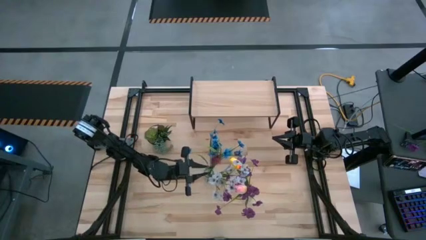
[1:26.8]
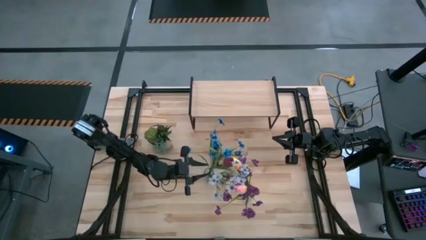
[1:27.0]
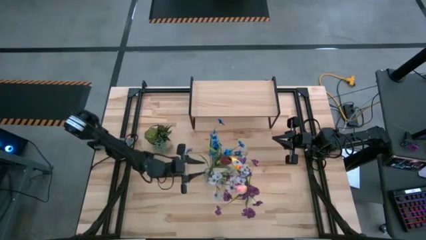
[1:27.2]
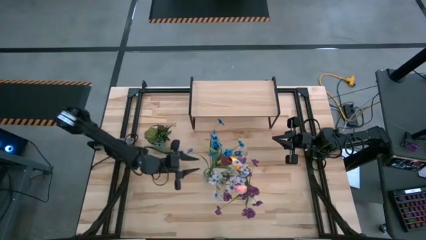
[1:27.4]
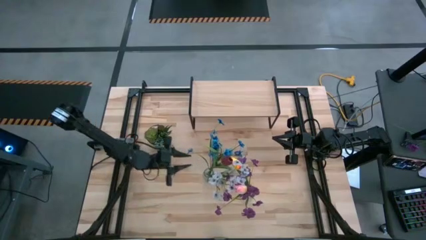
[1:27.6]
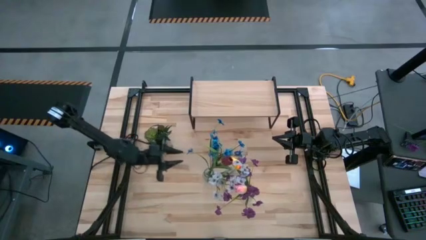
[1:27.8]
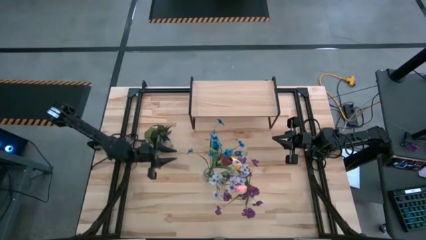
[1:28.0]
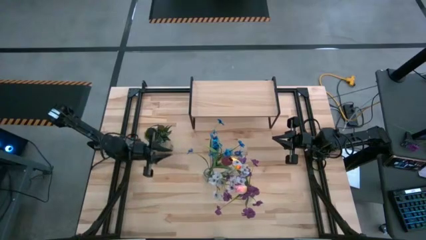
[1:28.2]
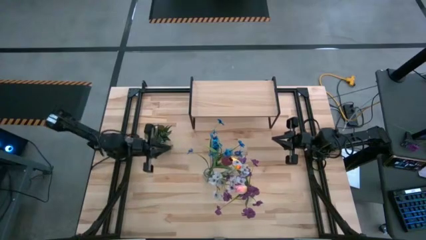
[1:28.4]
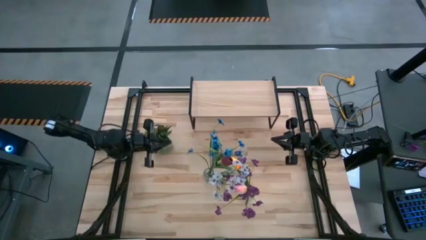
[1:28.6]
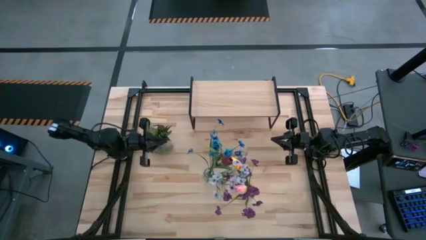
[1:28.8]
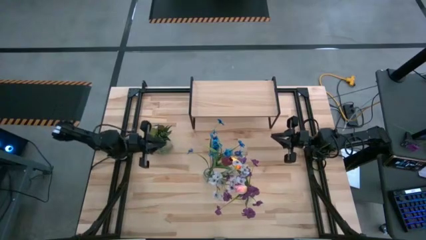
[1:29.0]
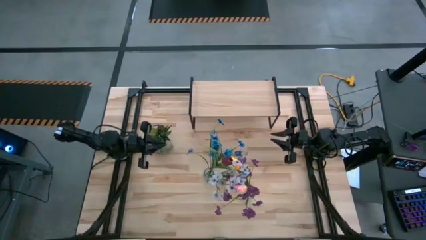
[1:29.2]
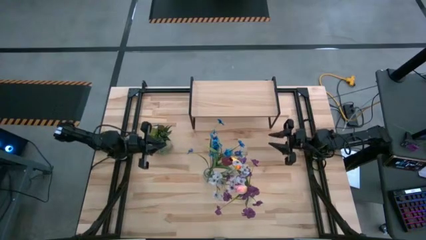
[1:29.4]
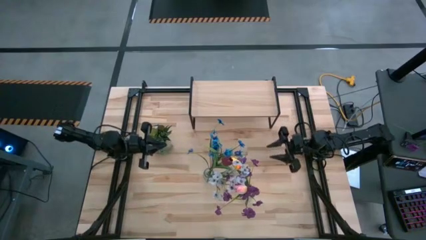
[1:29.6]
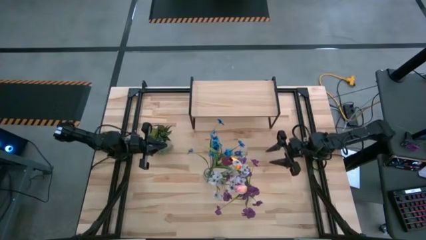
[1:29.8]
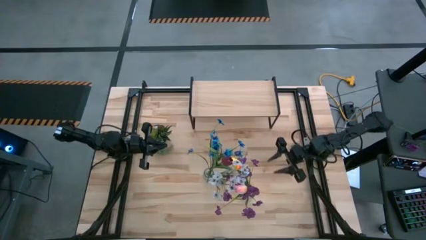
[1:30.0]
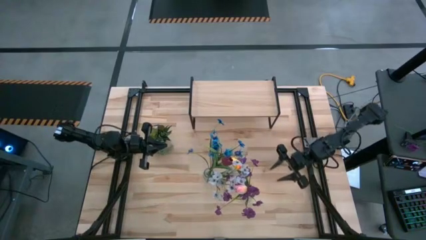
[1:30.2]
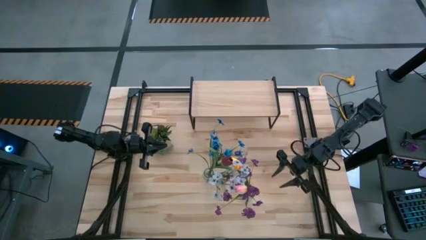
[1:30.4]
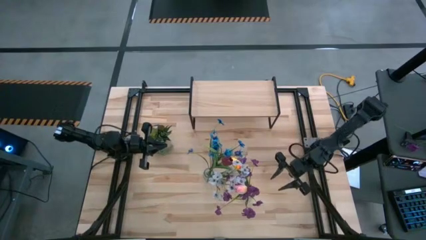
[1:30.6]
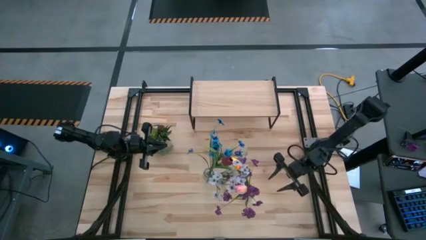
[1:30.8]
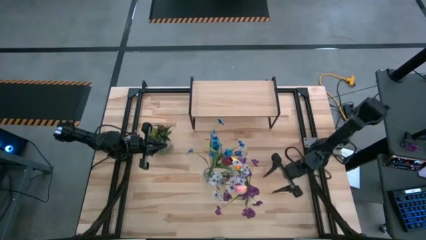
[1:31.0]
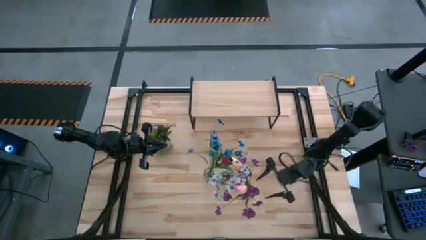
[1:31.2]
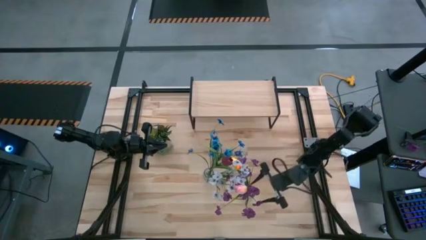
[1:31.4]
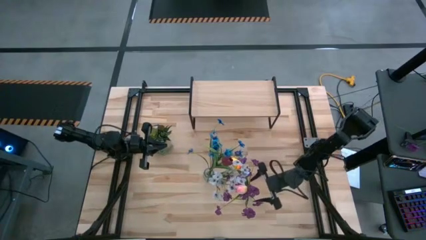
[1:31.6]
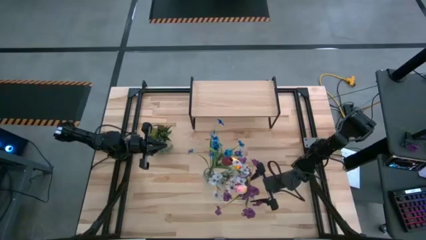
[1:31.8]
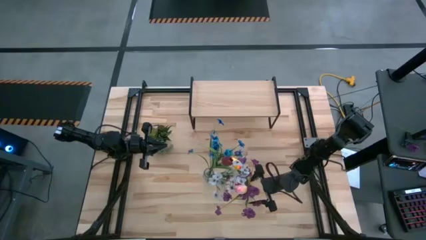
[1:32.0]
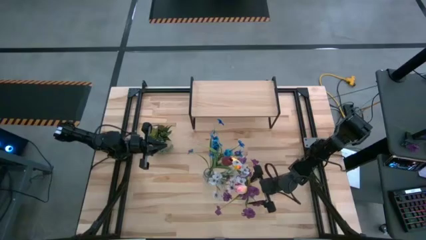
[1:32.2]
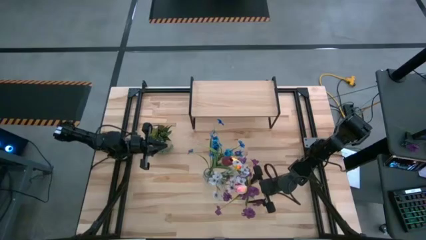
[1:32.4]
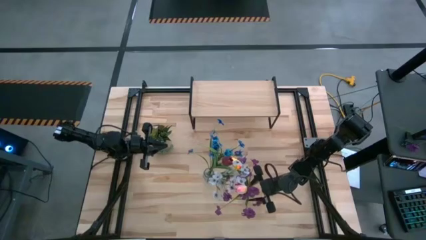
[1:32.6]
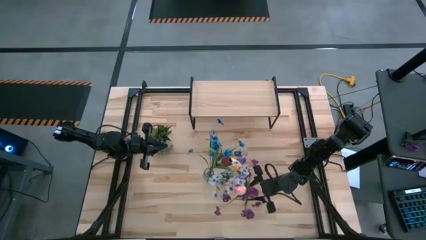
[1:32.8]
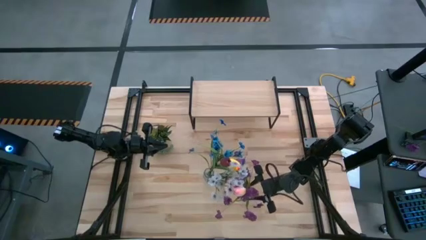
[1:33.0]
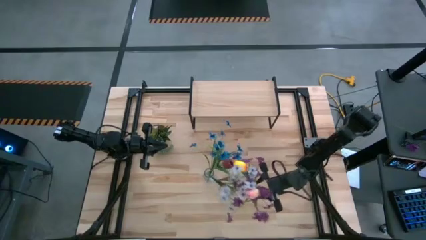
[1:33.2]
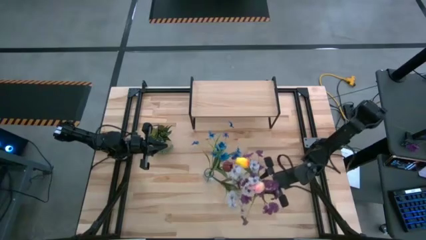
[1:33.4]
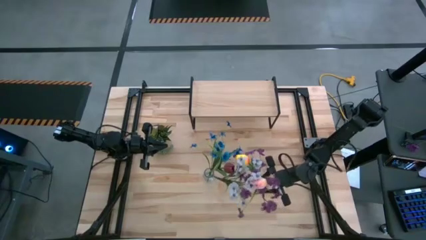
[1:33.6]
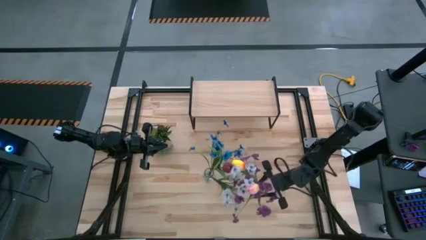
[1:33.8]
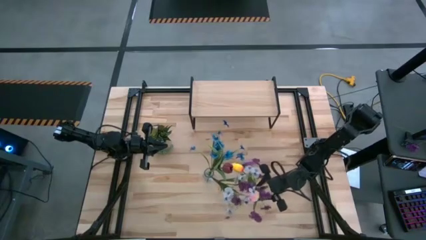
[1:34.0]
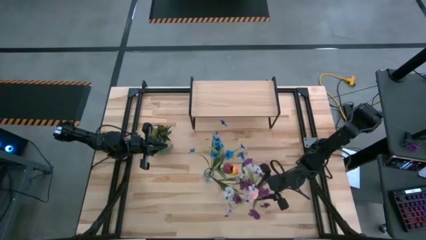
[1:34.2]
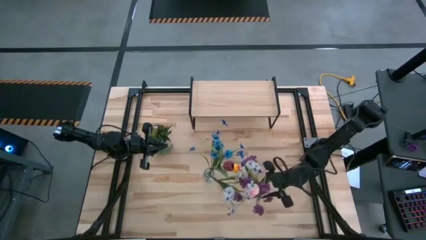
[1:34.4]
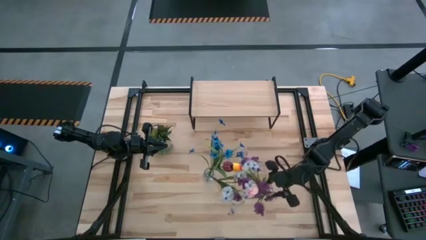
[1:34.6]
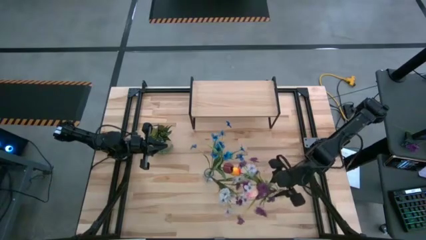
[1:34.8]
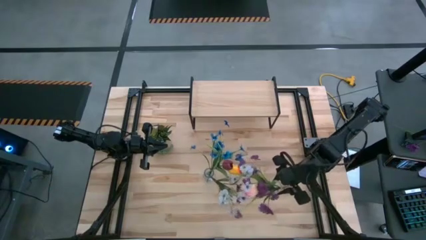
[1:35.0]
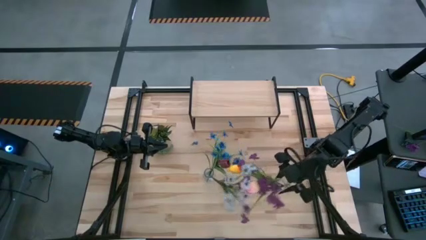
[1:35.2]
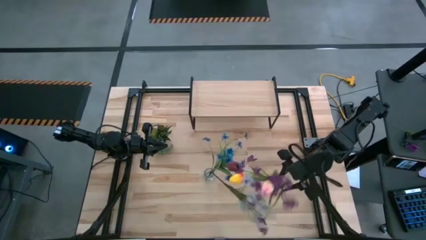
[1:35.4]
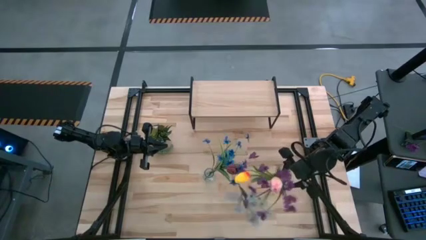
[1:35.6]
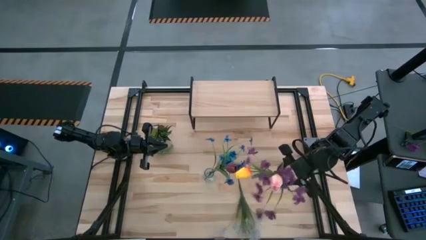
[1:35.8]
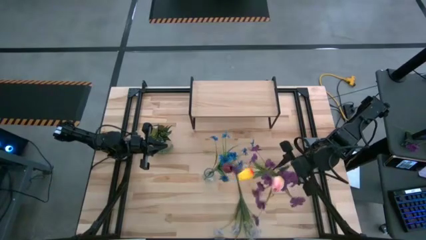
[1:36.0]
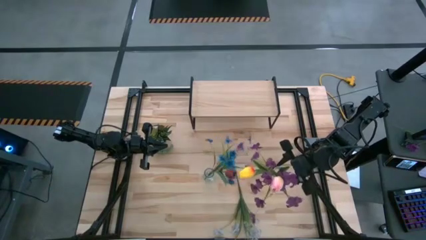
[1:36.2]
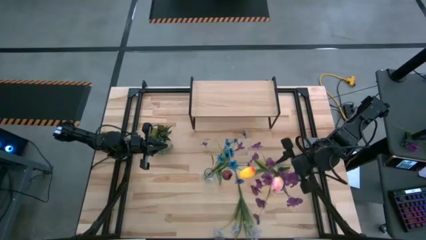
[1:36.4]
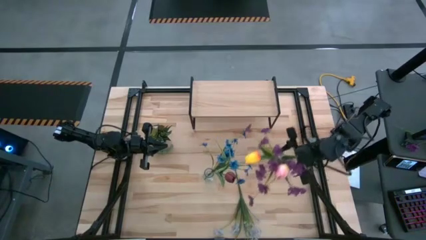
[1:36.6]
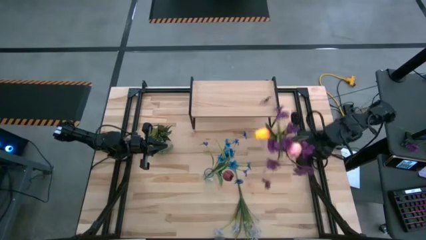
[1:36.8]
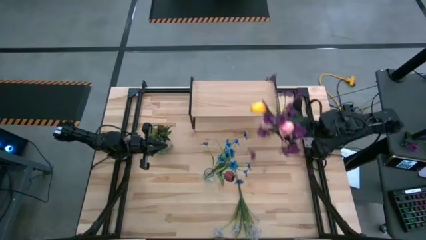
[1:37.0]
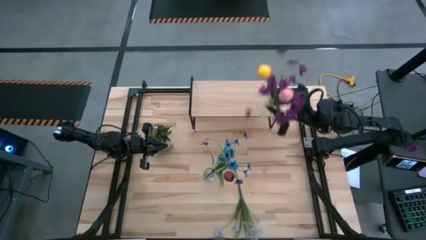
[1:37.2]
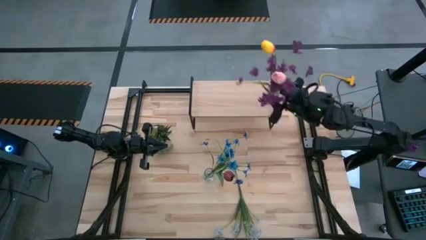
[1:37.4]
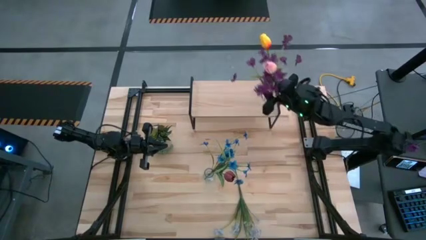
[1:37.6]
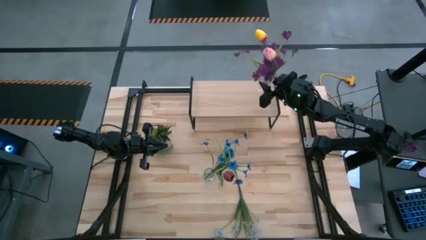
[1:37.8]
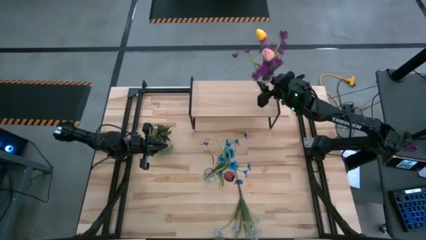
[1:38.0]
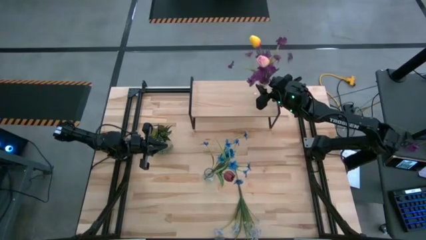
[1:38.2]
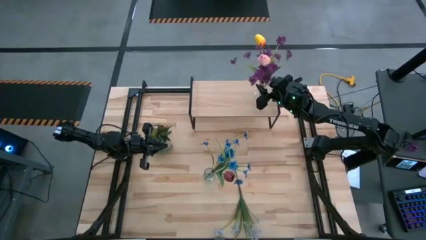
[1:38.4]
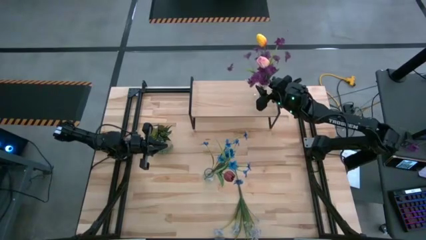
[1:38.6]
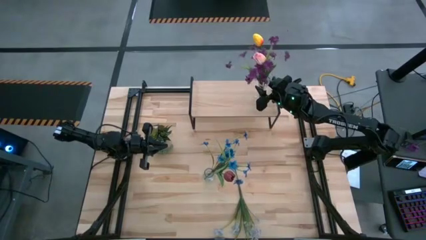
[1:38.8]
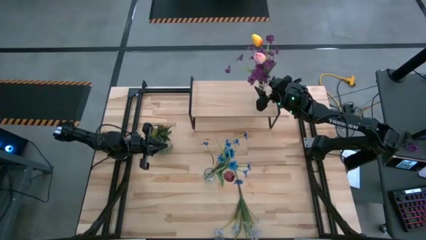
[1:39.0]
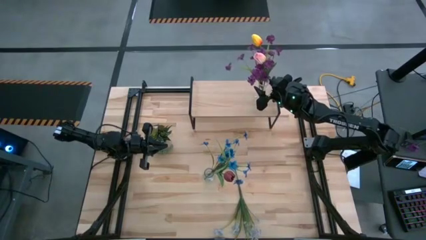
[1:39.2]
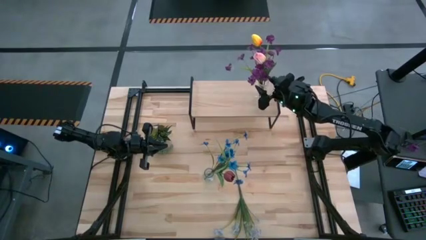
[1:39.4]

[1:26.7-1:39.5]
Task: Pick and place flowers into a vace then onto a shelf
Put the right transparent vase on the shelf
